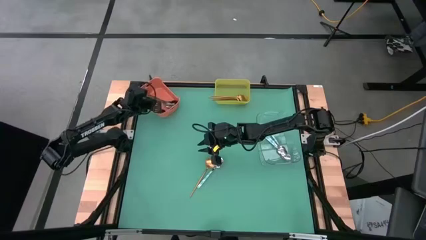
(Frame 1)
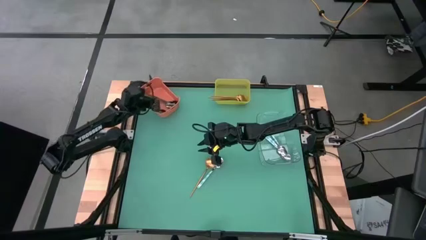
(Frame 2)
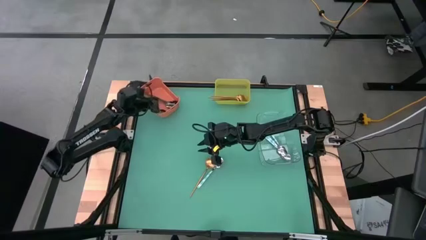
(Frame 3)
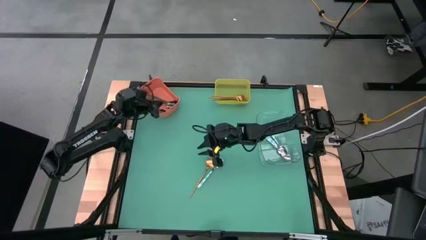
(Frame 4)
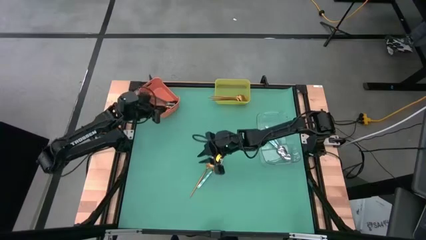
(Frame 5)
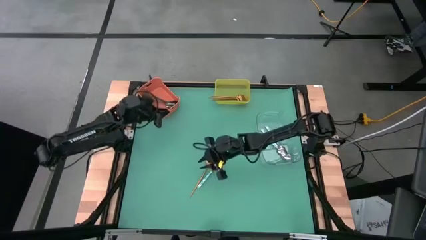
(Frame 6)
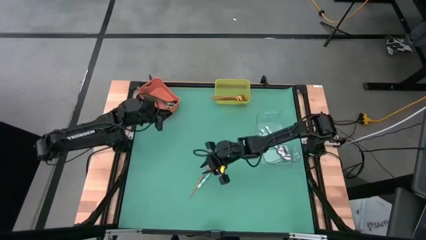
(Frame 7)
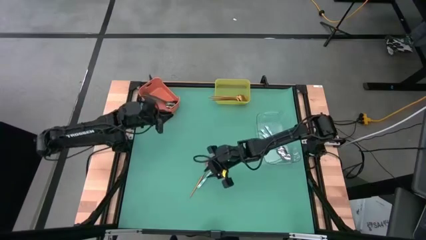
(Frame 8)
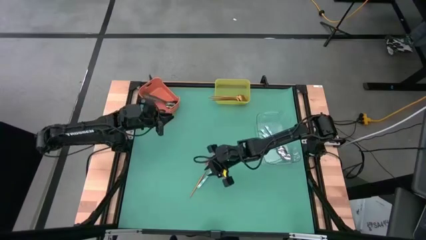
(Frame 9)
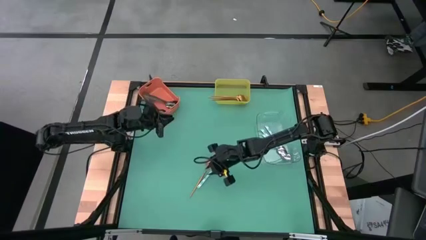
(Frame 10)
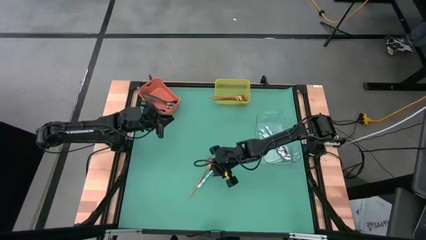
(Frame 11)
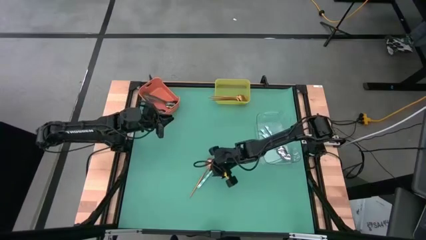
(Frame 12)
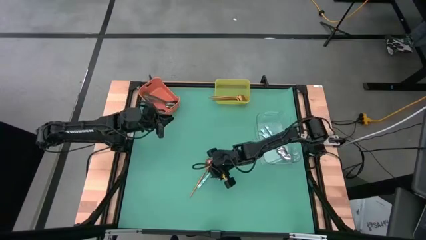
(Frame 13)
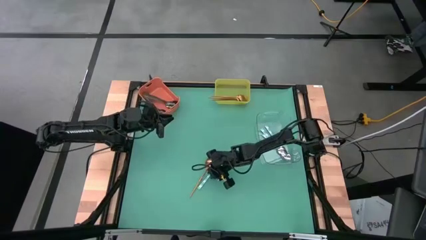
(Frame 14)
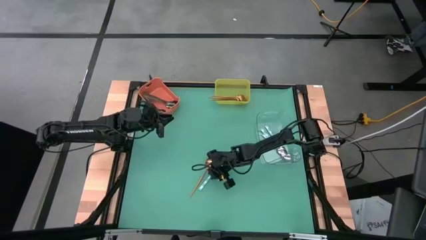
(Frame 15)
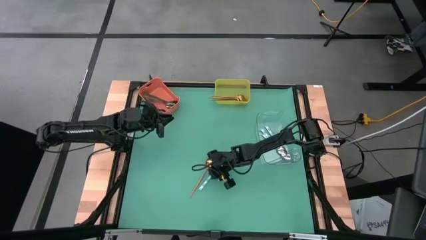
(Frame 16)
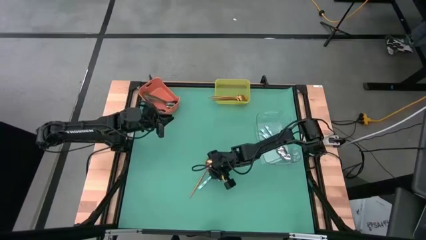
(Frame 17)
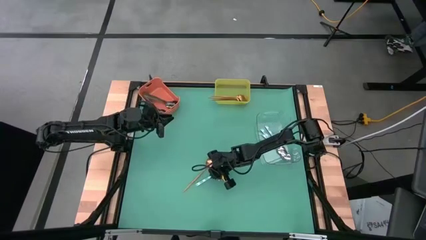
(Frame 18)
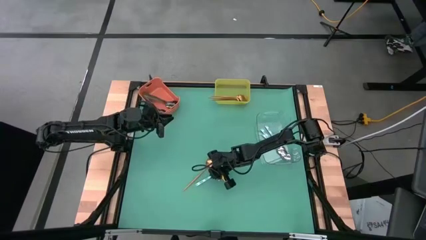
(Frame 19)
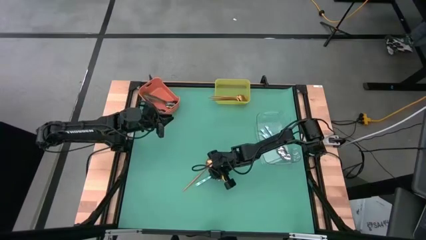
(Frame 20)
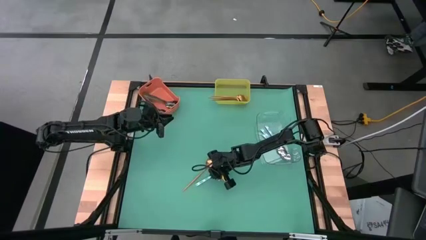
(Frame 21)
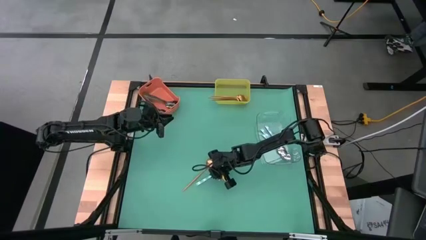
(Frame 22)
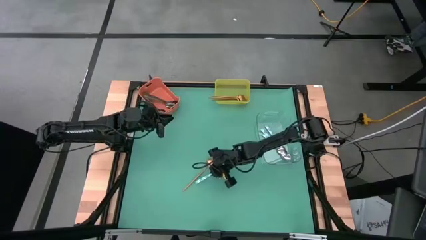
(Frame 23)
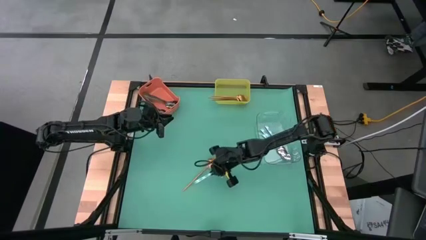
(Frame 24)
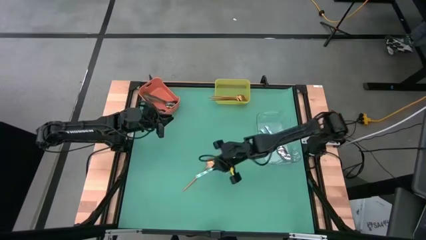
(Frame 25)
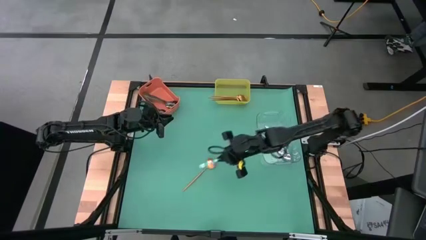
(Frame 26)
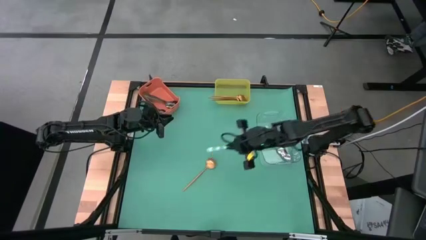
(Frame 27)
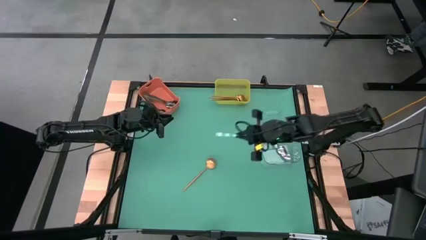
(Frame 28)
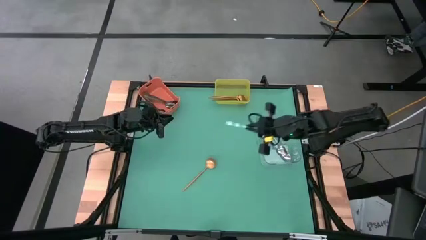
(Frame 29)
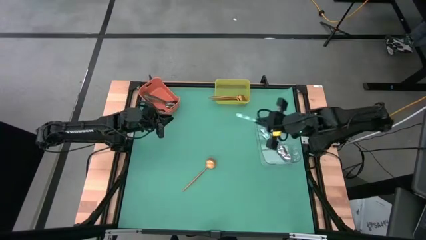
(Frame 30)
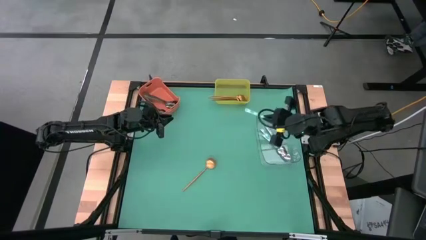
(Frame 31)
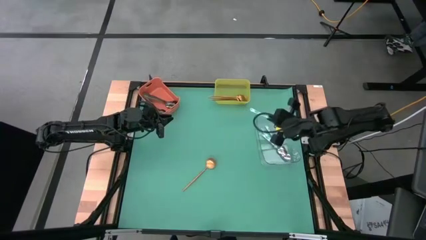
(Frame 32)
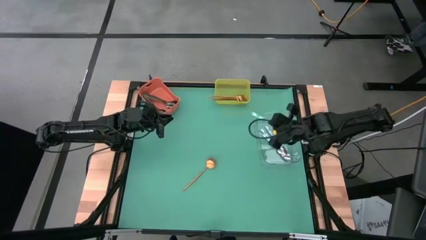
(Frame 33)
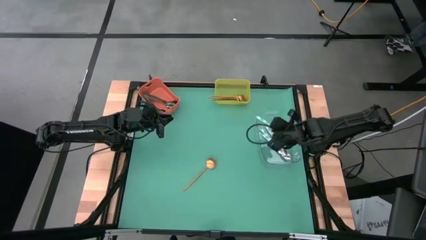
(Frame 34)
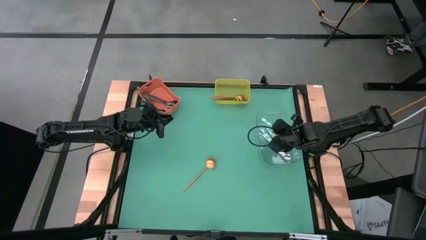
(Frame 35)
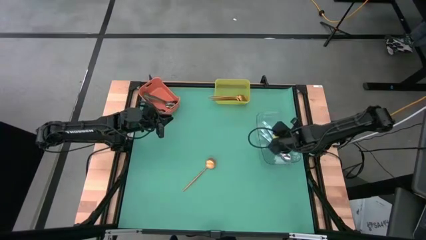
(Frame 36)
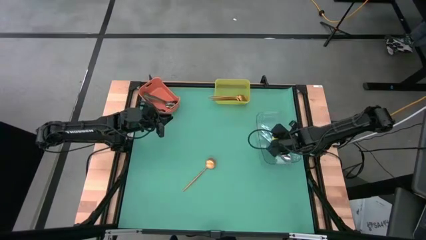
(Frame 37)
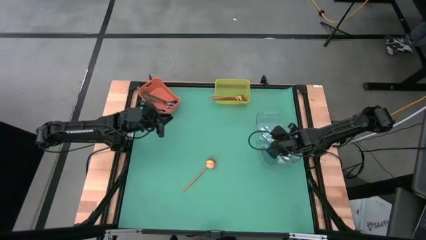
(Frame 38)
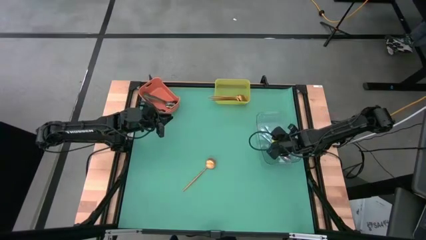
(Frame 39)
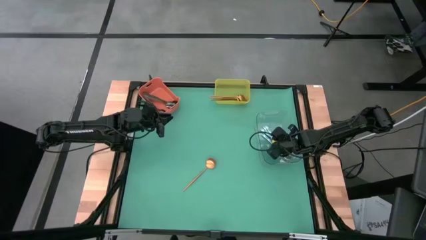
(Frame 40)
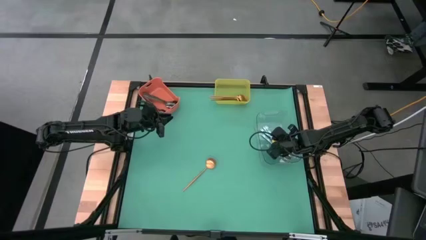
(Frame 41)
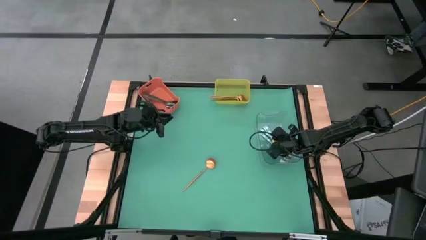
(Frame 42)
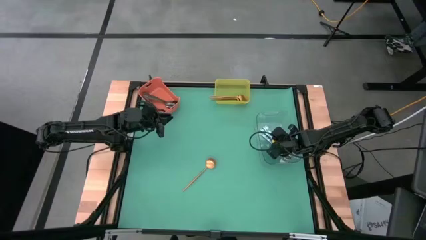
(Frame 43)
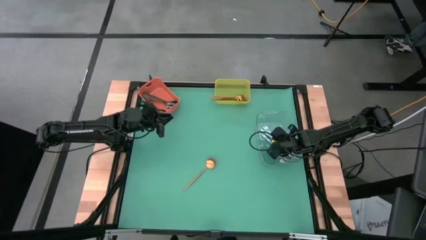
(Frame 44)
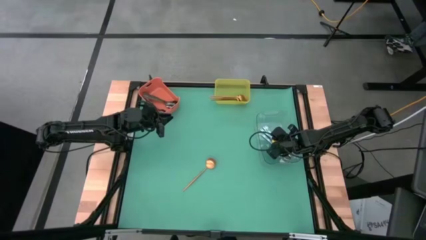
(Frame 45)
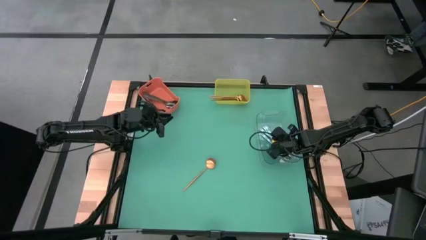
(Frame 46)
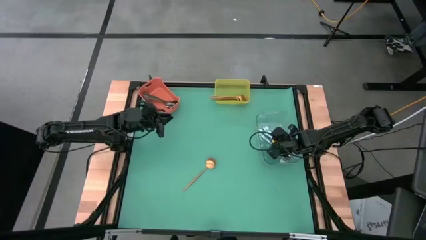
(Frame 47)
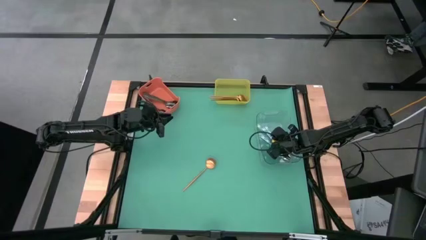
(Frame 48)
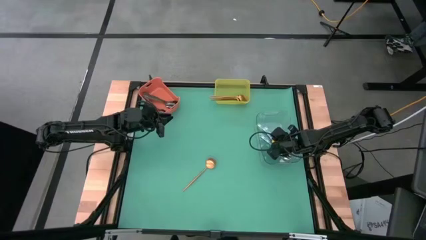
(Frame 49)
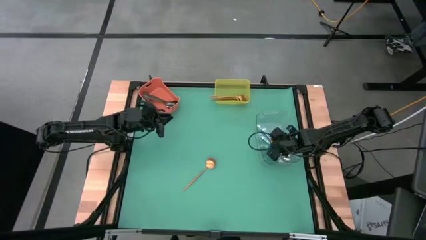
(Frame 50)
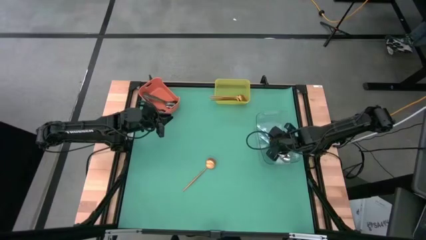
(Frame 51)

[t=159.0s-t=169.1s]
Task: Sort silverware by color (type)
Put the white patterned spoon into the transparent bin

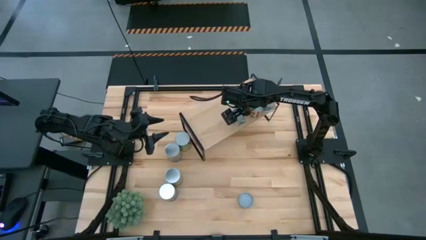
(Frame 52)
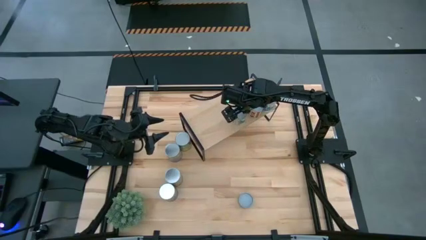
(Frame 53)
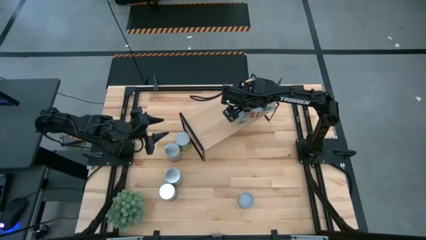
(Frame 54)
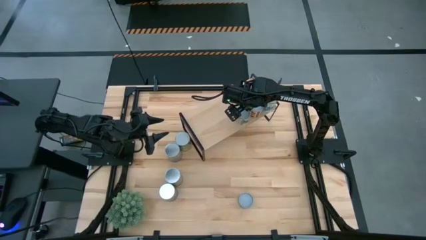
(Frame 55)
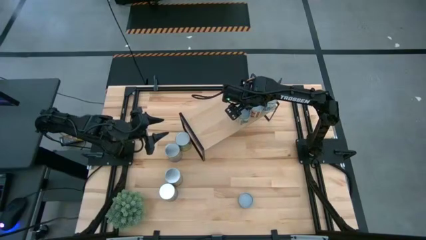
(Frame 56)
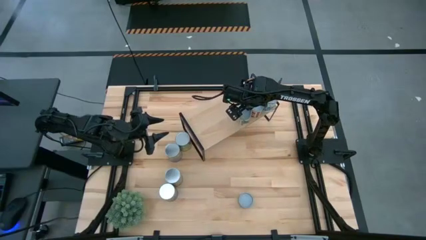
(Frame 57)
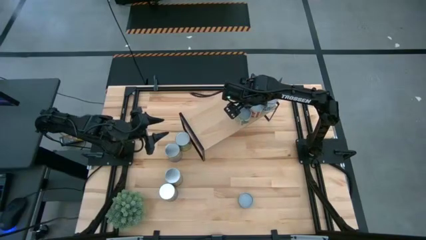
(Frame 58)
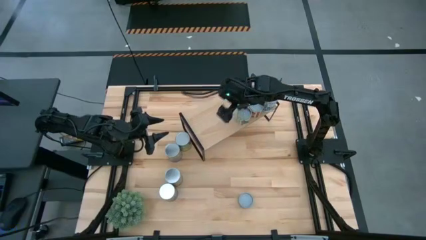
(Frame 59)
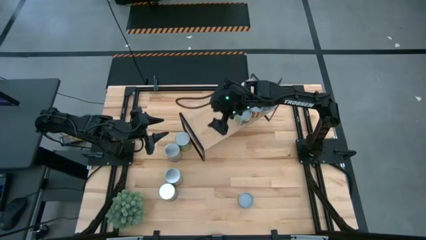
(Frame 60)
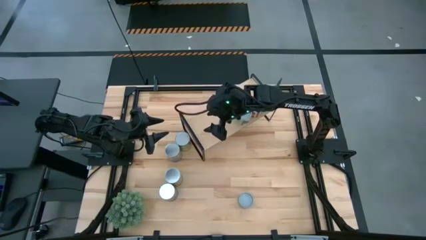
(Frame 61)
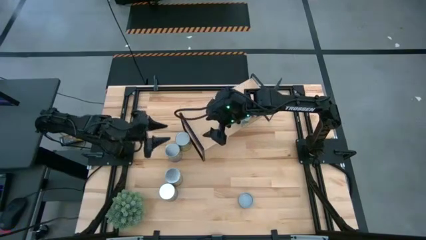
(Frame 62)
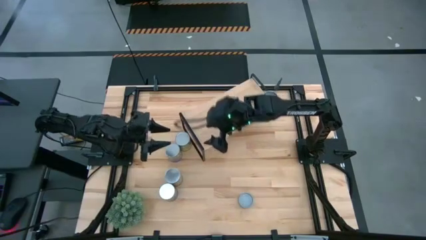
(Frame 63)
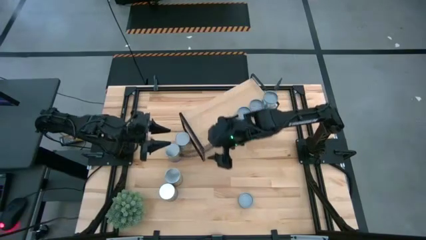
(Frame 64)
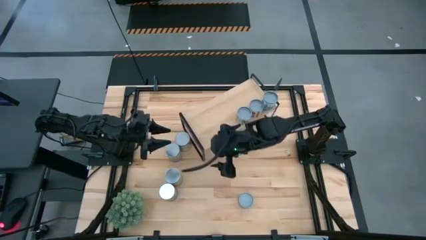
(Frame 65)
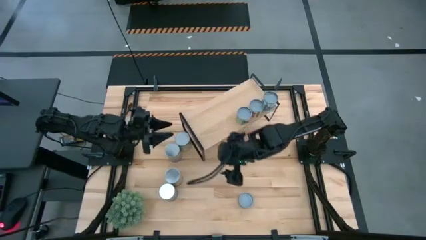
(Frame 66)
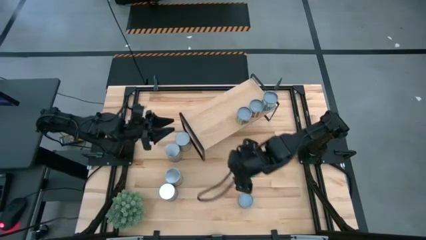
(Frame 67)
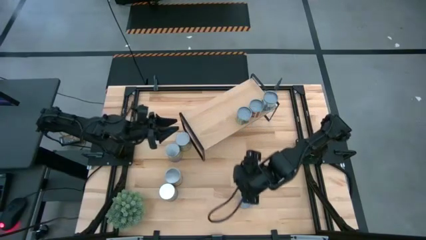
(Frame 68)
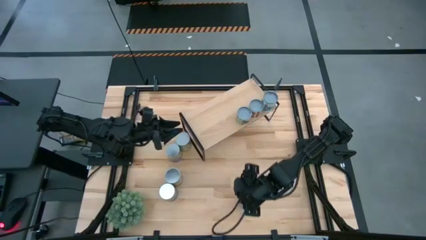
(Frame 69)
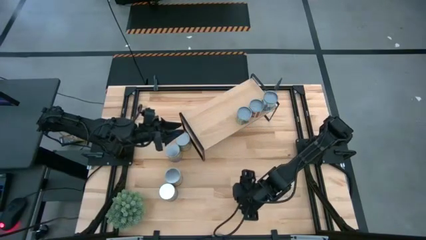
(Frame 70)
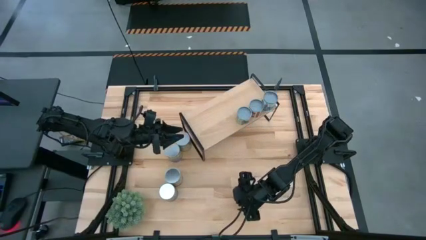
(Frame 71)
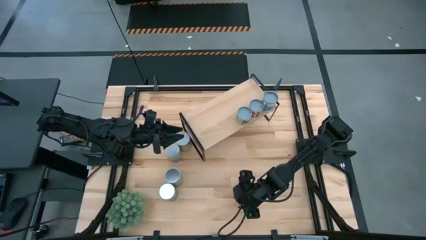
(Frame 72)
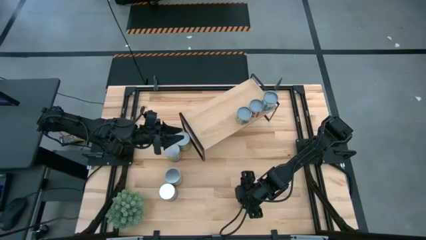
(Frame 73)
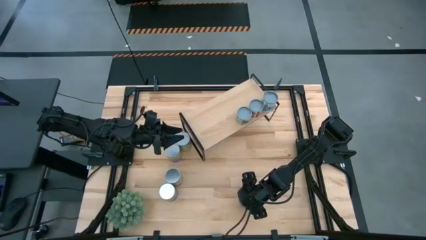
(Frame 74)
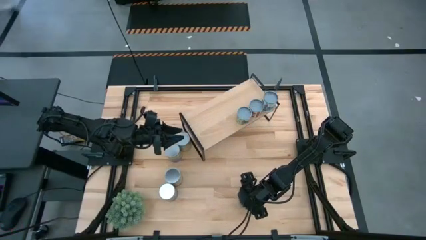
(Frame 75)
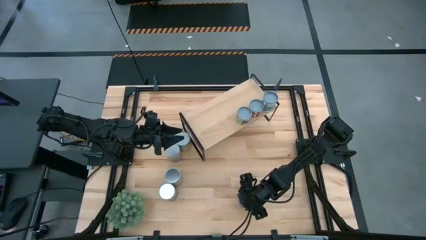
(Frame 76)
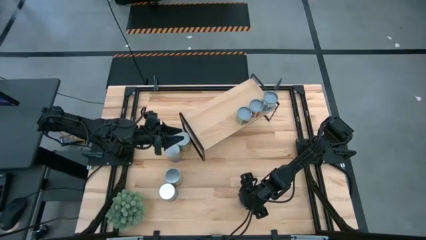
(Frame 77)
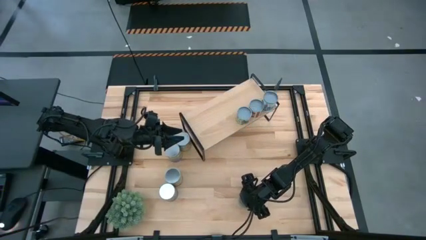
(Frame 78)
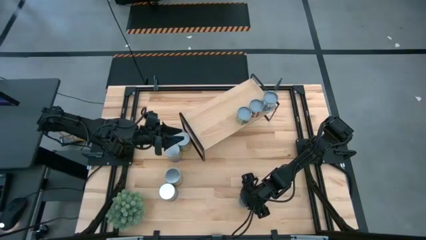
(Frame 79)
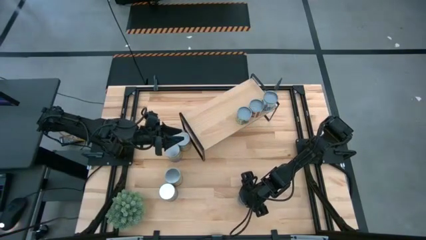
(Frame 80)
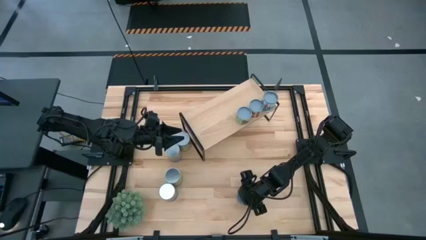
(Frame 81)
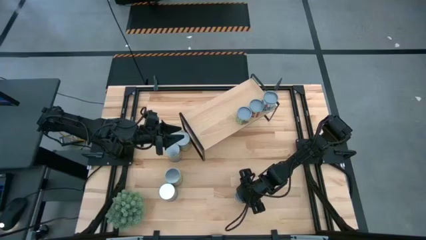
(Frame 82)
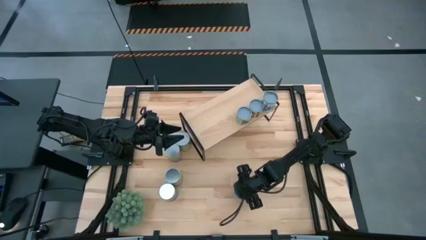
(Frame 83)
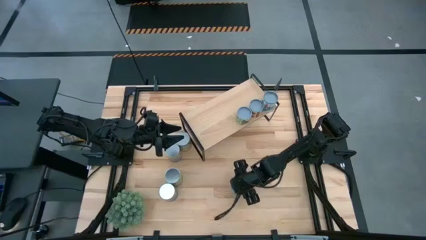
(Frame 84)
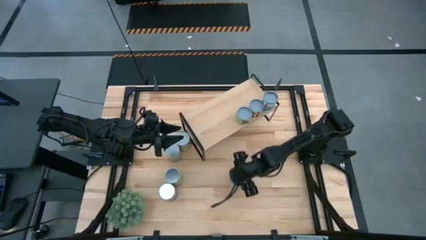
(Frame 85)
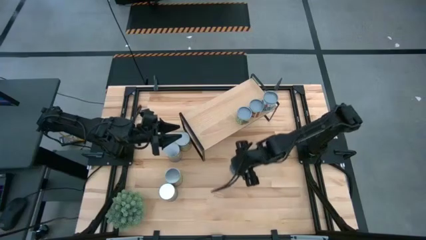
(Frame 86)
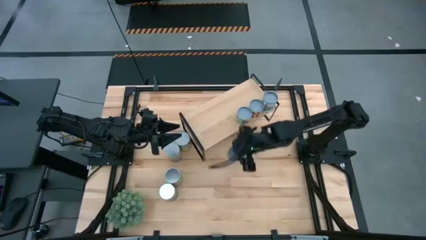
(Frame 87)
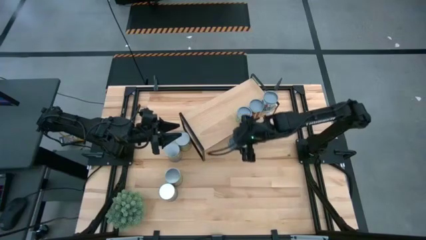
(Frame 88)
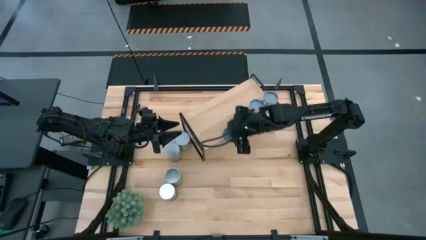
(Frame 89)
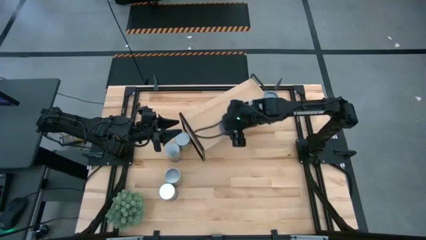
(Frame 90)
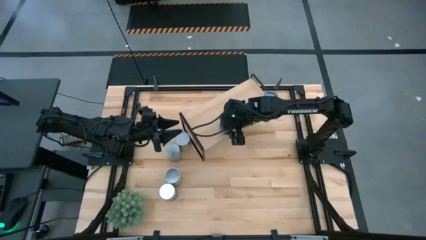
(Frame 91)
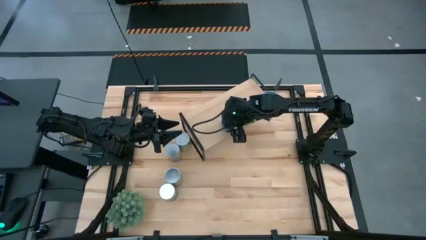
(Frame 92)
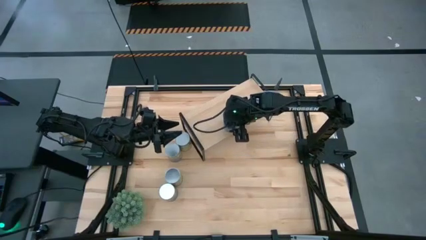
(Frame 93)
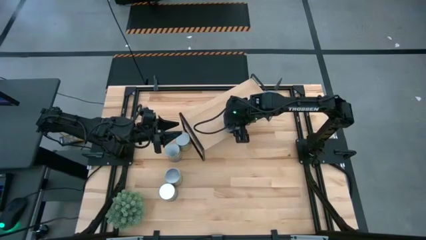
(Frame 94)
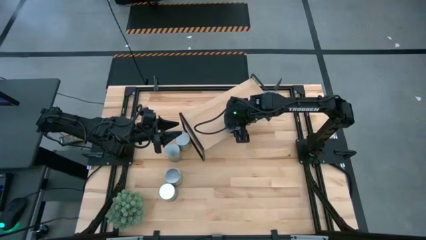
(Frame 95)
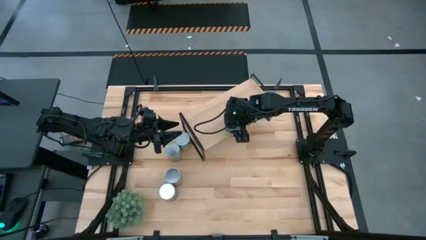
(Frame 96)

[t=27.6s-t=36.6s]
Task: Pick and place cans onto a shelf
Put the canned tuna on the shelf
